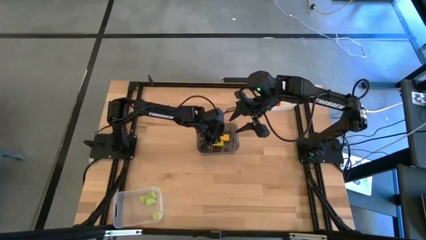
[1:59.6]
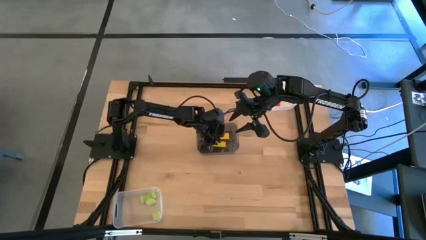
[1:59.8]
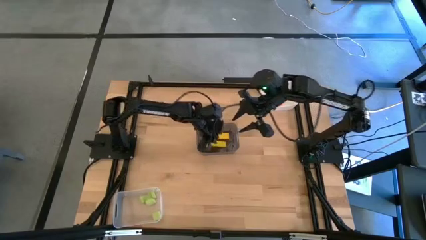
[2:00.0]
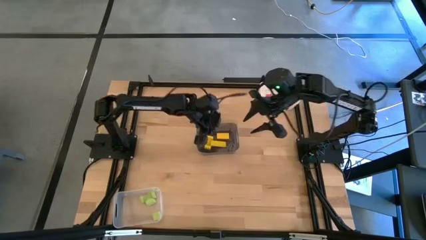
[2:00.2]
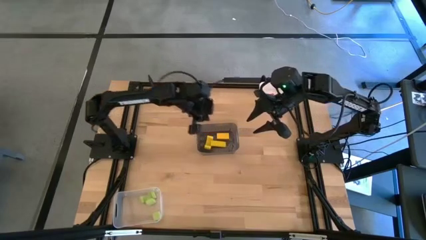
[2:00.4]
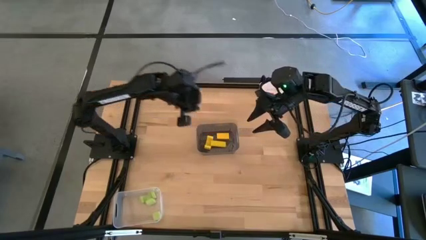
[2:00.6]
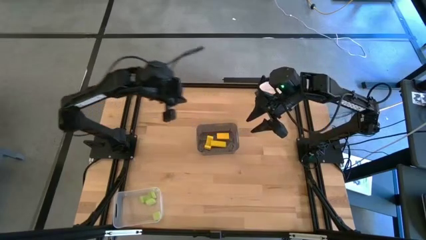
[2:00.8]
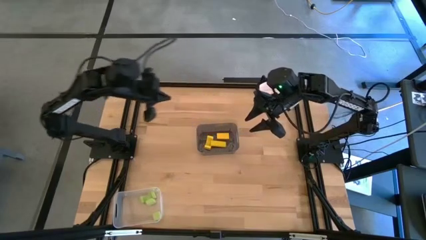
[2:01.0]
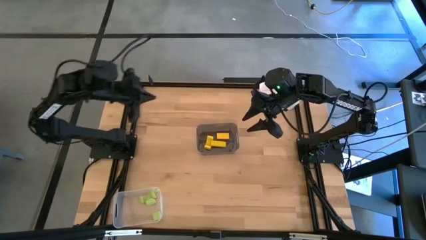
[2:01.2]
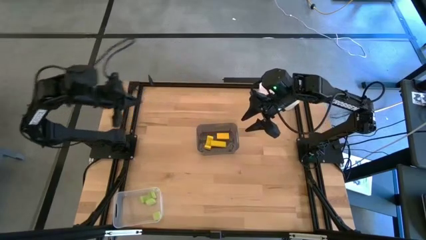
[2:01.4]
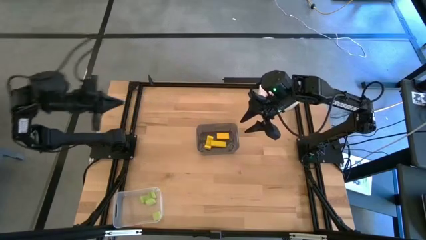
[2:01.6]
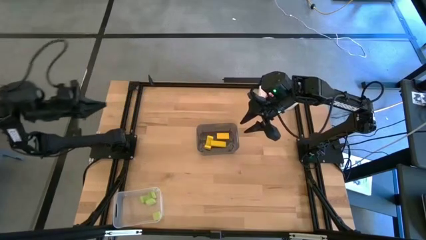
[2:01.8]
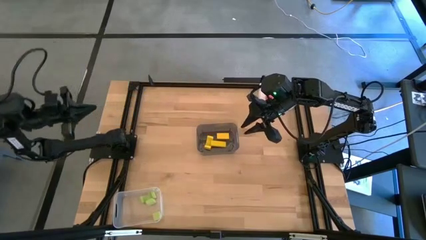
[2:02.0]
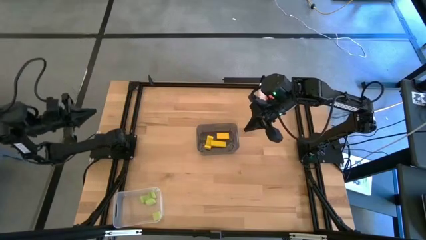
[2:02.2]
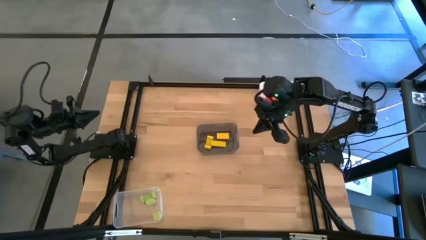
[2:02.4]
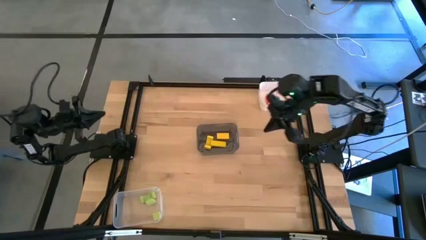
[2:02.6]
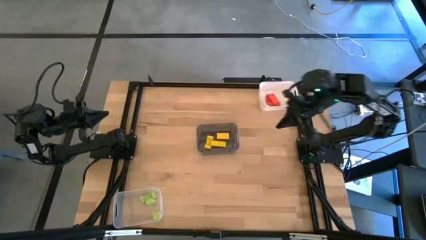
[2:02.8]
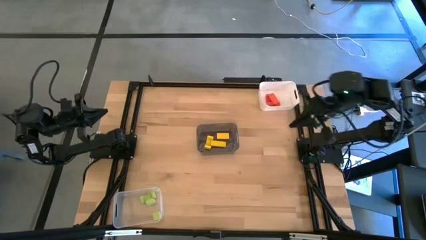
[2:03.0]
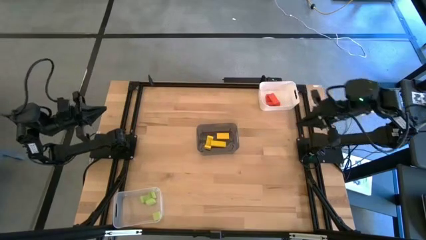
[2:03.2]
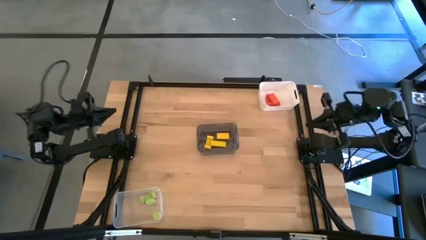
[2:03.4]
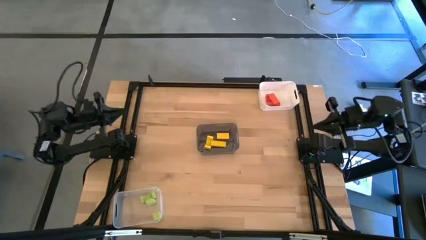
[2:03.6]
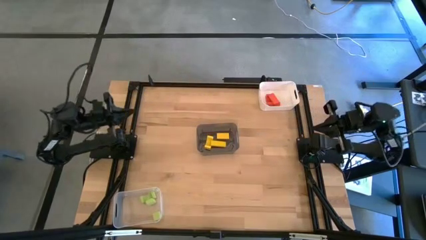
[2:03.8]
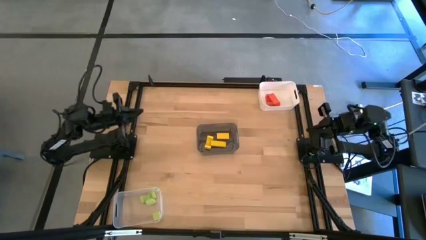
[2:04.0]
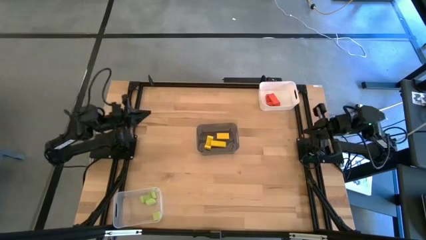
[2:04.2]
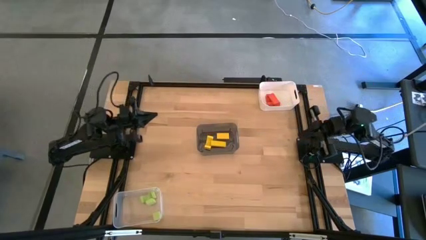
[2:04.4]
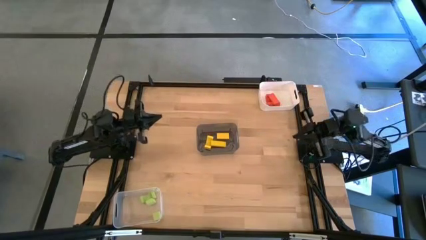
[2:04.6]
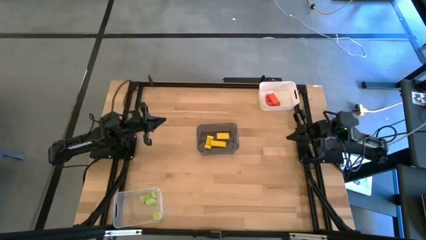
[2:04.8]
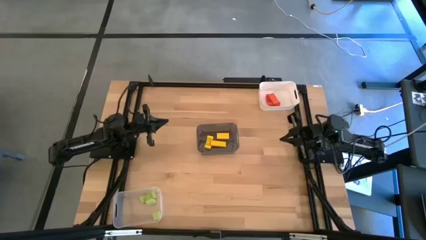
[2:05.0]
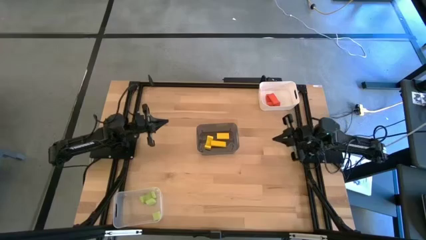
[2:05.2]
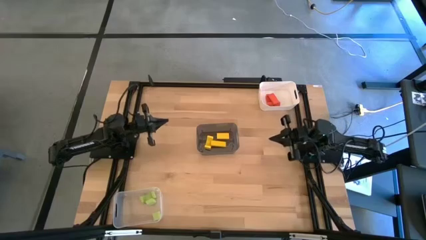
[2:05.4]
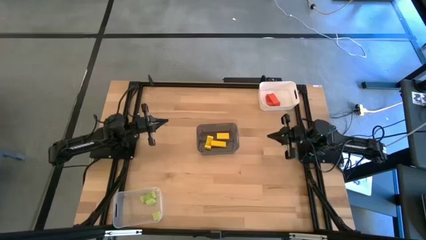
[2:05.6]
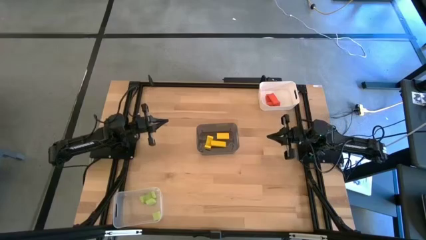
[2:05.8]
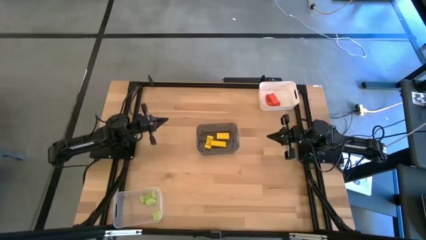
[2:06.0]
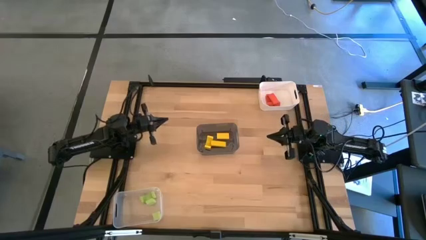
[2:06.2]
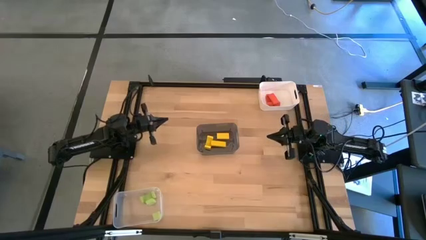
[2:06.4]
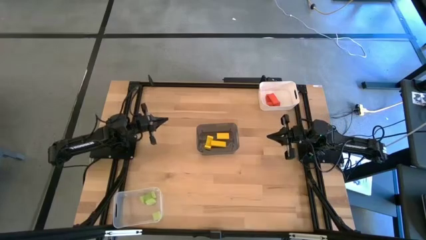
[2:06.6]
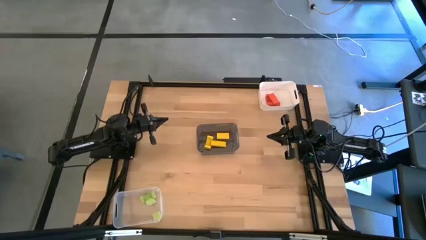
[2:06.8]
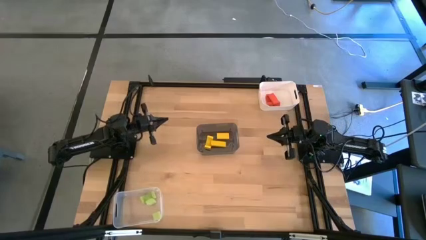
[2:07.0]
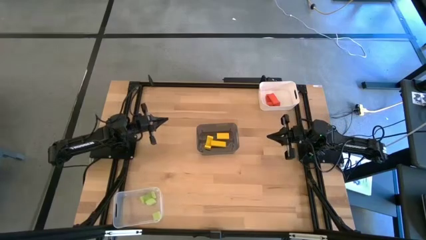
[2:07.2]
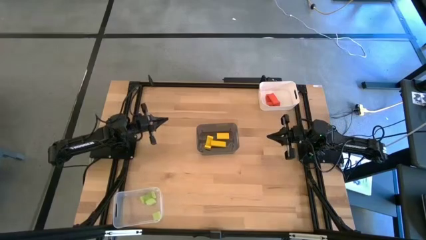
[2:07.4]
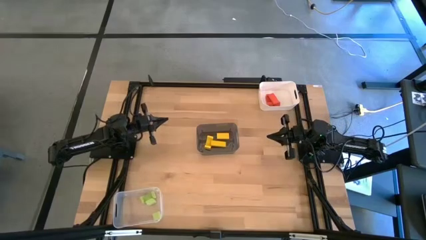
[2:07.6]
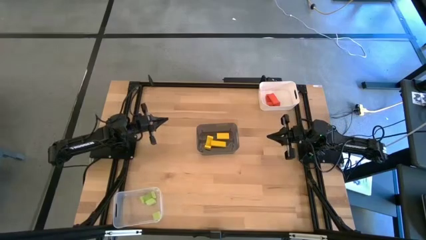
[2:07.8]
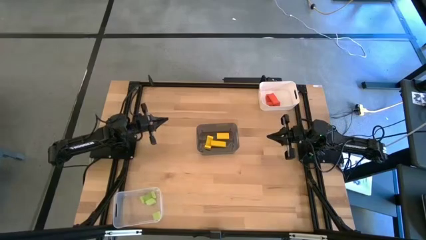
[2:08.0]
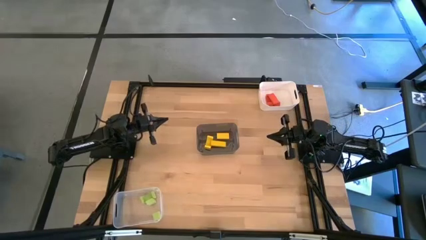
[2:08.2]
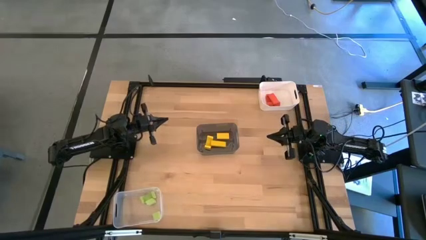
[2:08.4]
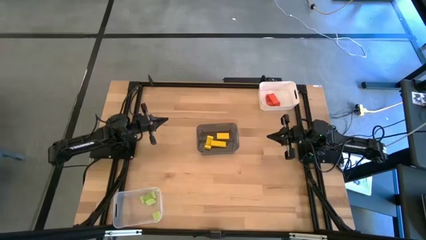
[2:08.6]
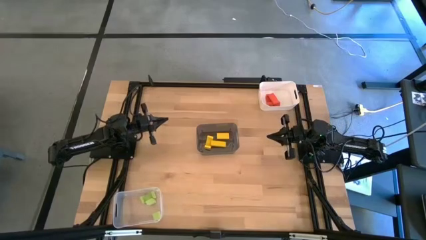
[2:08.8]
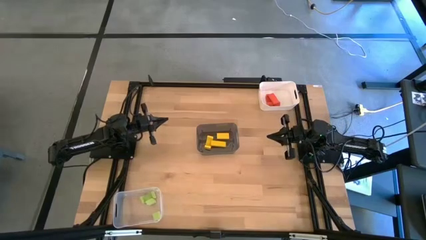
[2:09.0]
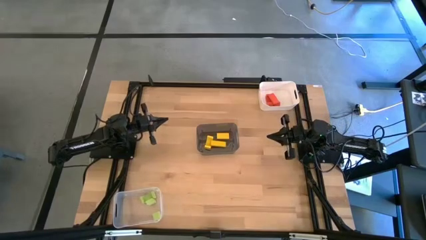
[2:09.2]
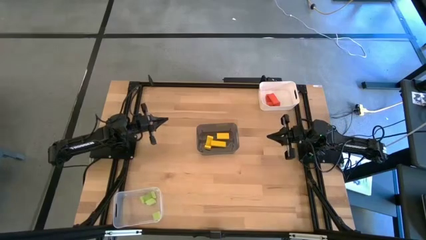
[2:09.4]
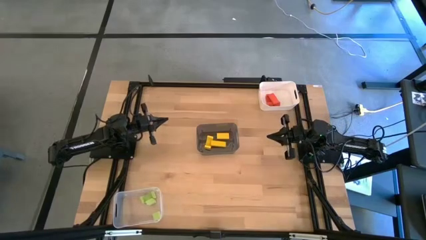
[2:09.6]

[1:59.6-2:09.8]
Task: Sort & place blocks by color
Return to Home Position
